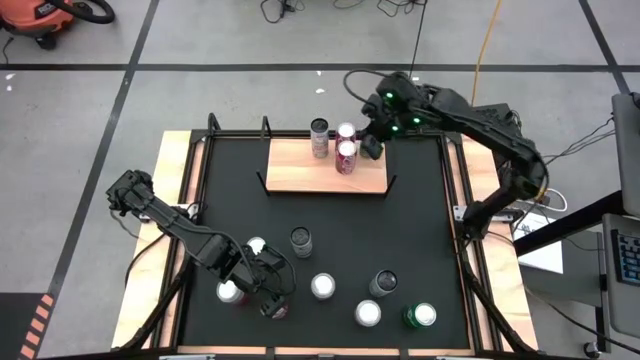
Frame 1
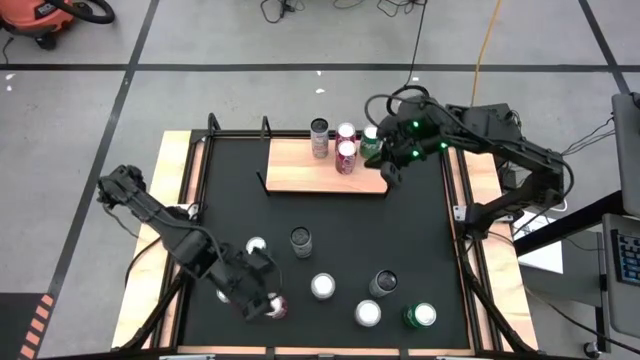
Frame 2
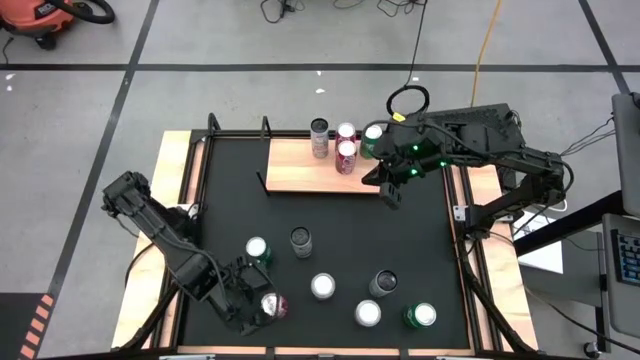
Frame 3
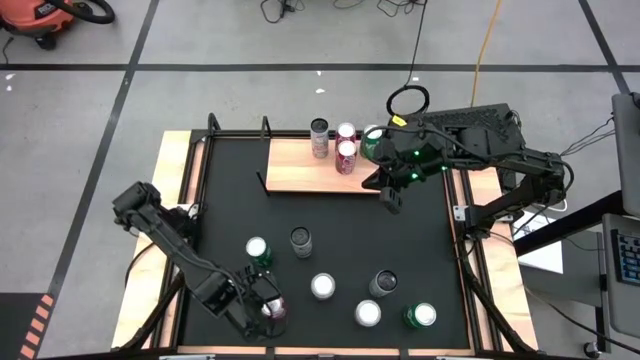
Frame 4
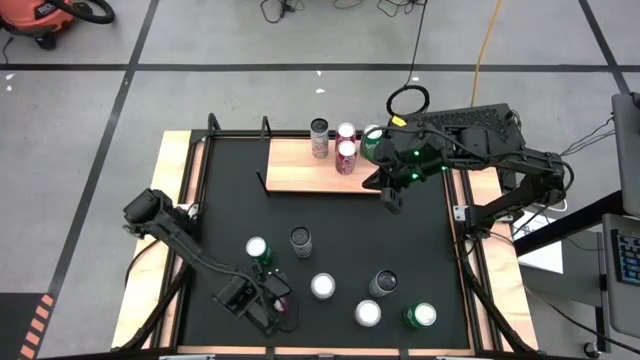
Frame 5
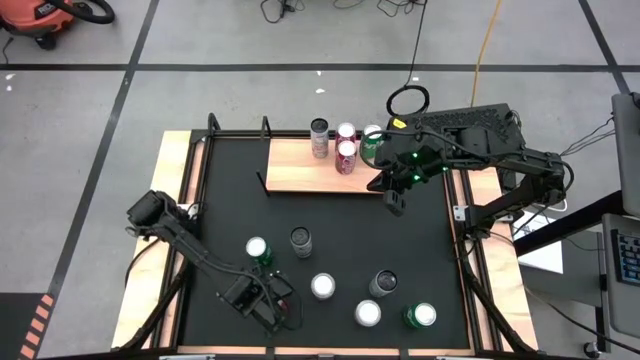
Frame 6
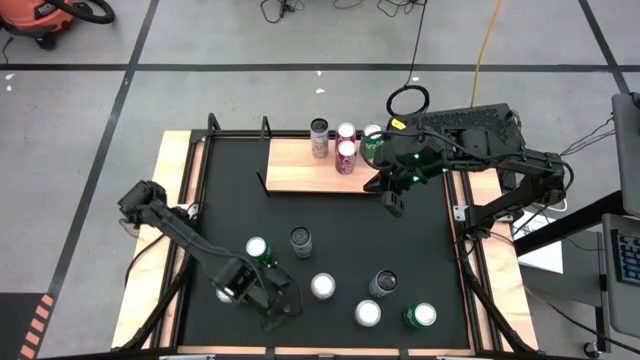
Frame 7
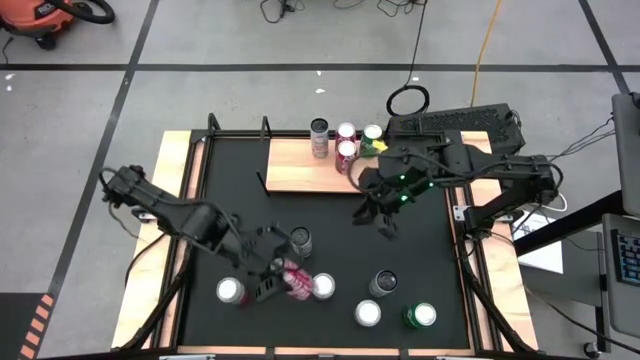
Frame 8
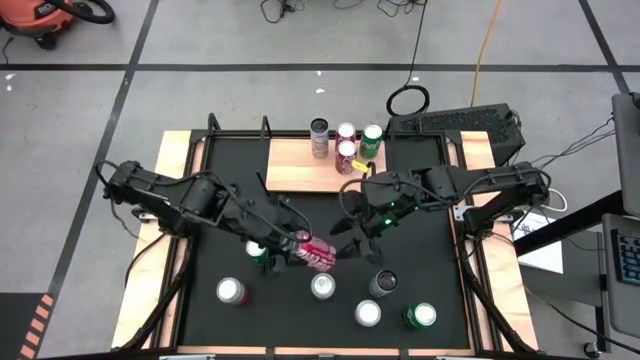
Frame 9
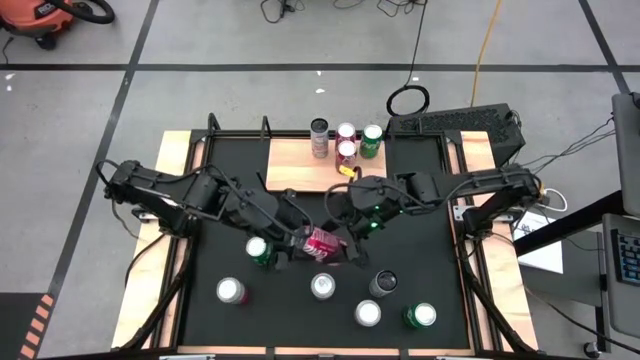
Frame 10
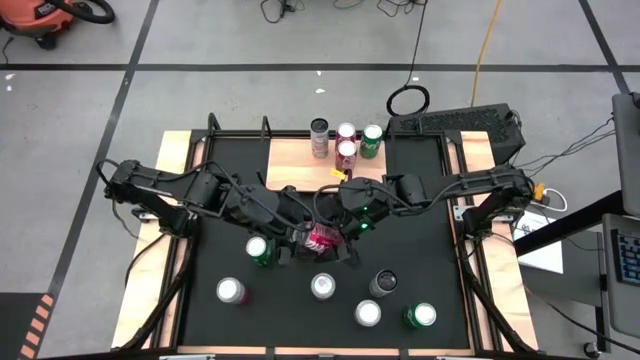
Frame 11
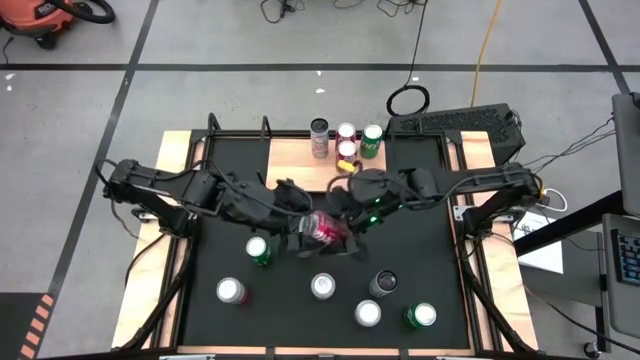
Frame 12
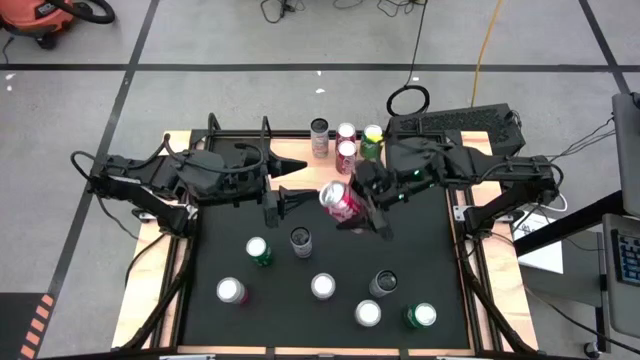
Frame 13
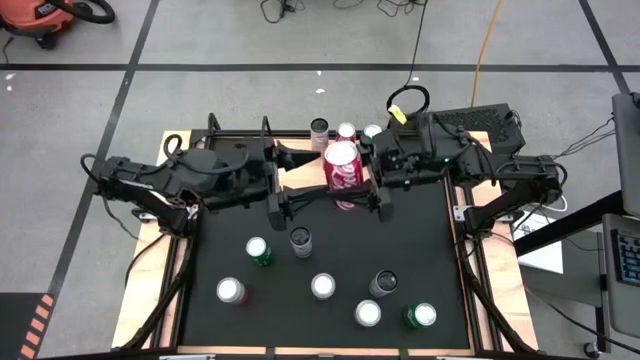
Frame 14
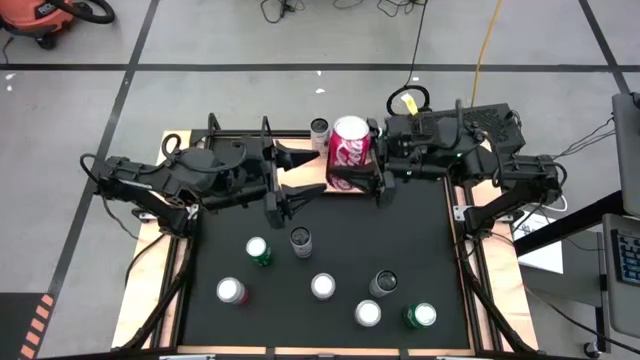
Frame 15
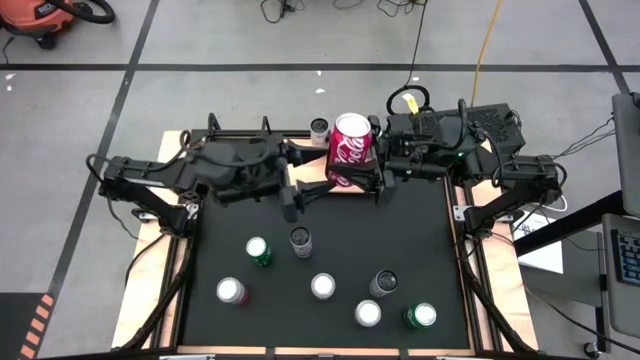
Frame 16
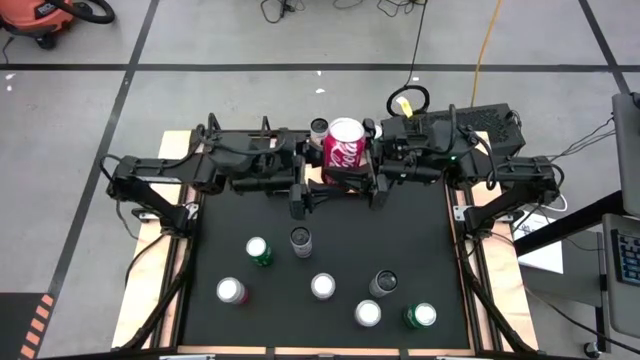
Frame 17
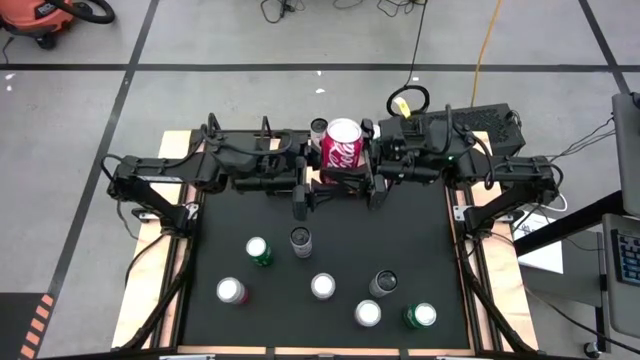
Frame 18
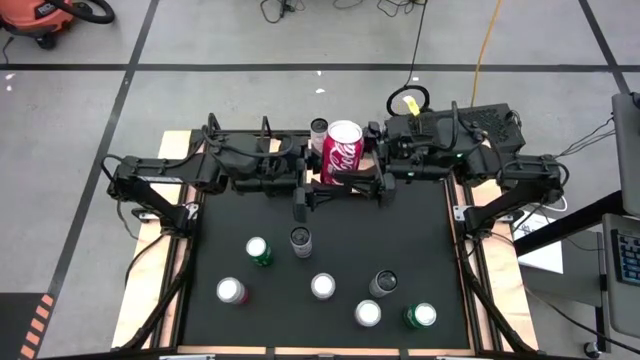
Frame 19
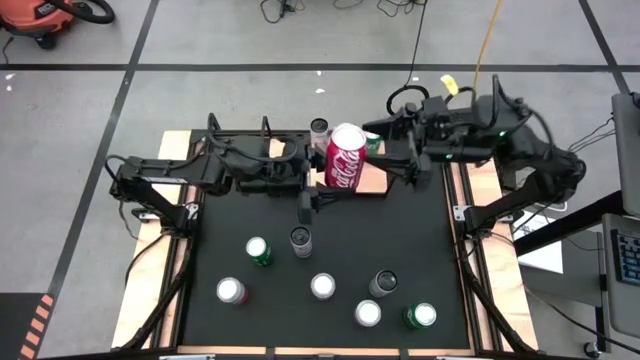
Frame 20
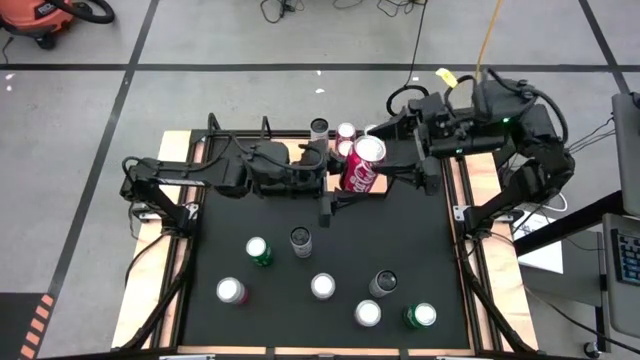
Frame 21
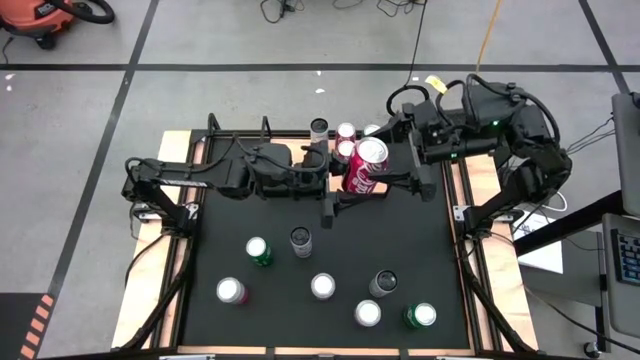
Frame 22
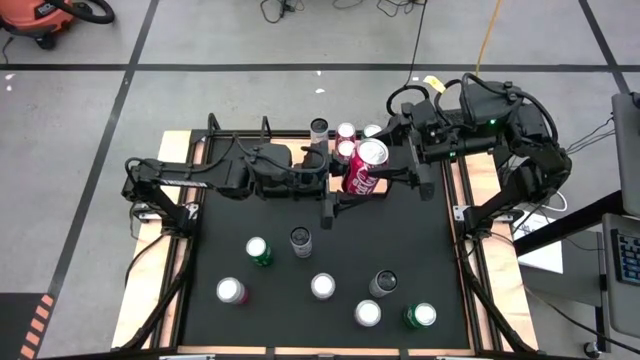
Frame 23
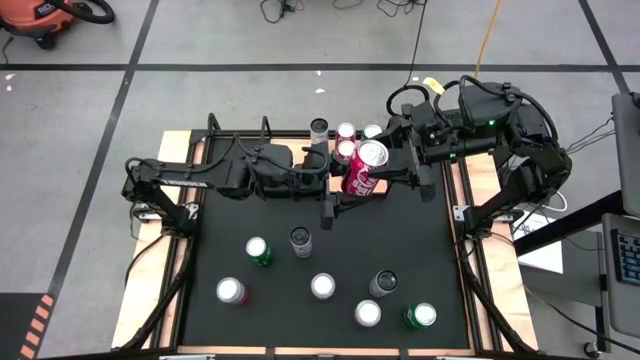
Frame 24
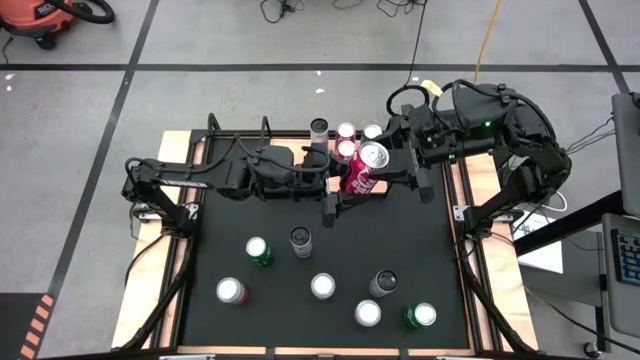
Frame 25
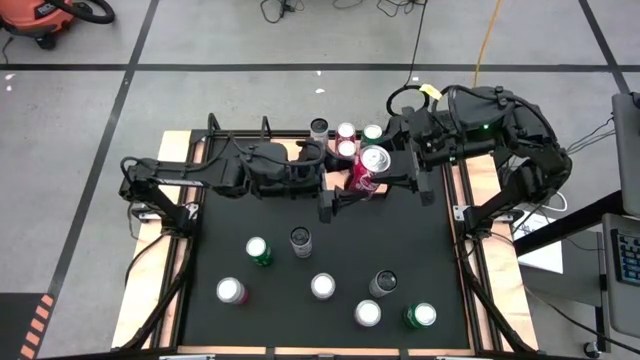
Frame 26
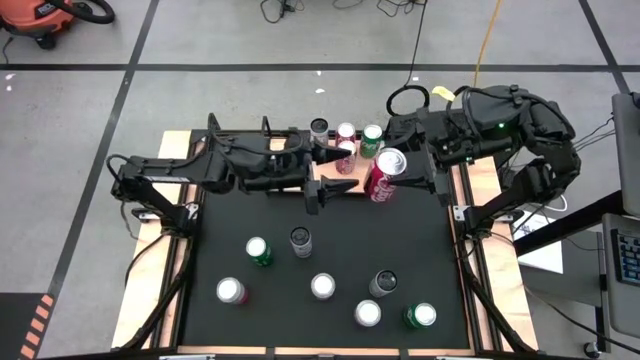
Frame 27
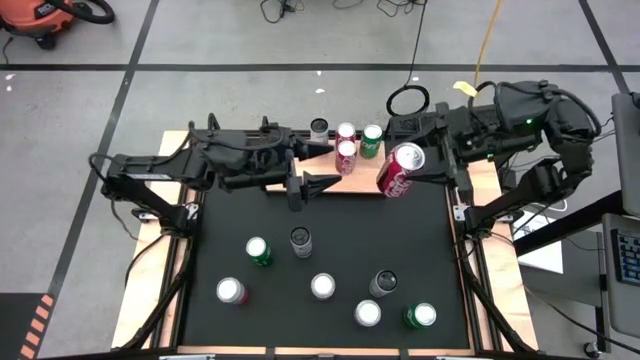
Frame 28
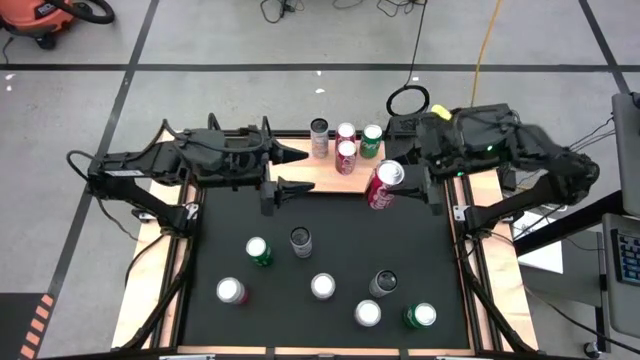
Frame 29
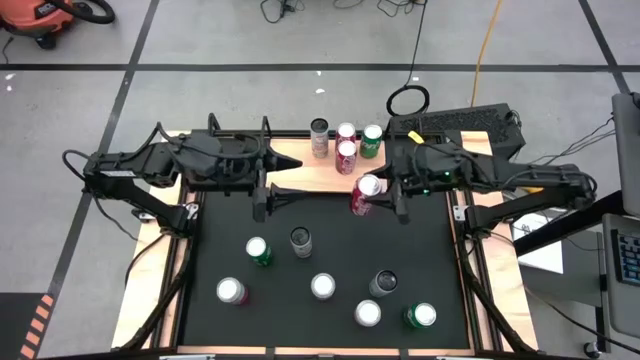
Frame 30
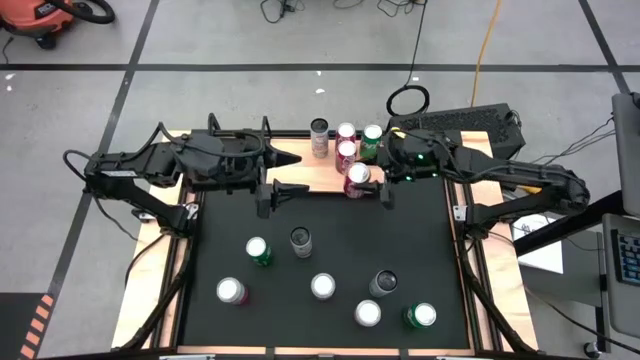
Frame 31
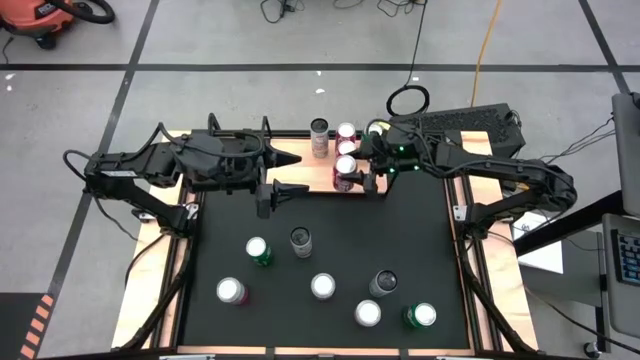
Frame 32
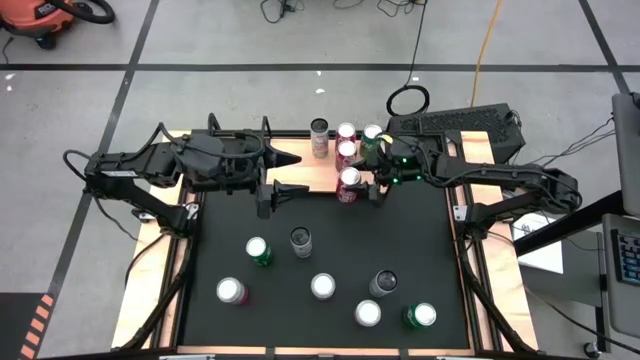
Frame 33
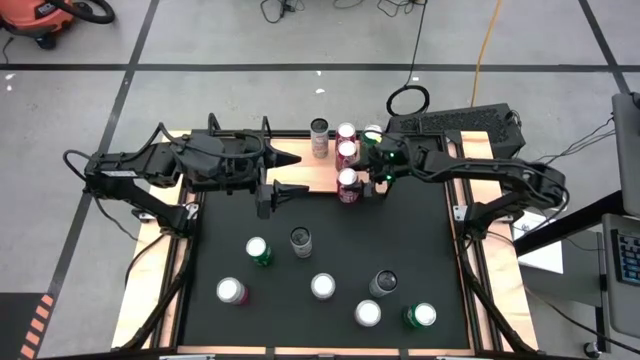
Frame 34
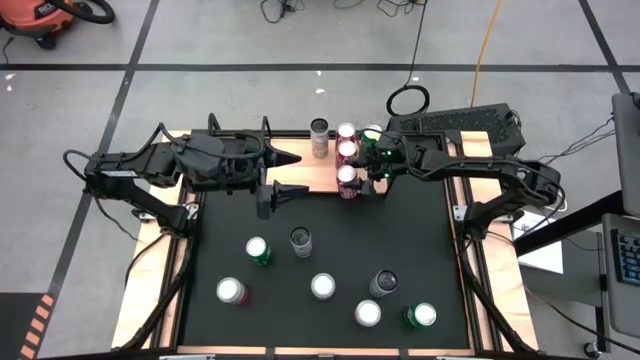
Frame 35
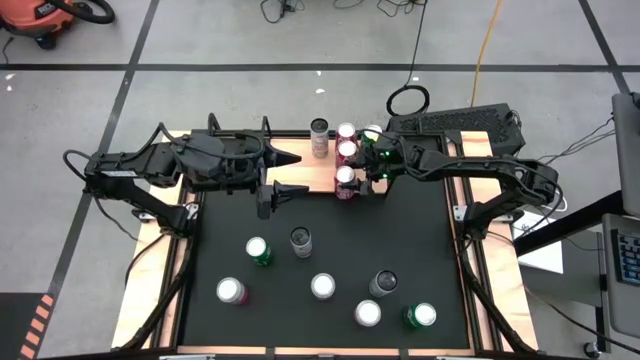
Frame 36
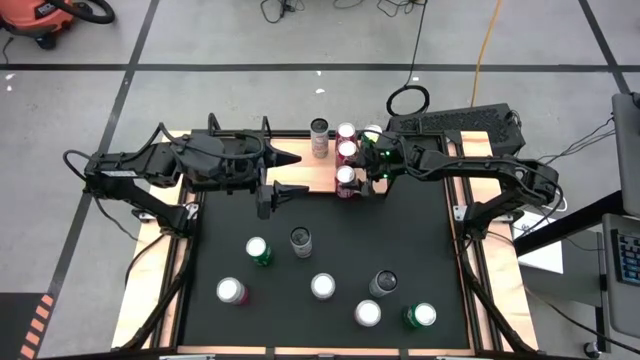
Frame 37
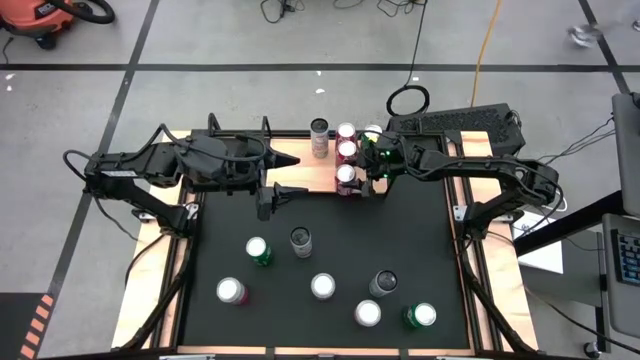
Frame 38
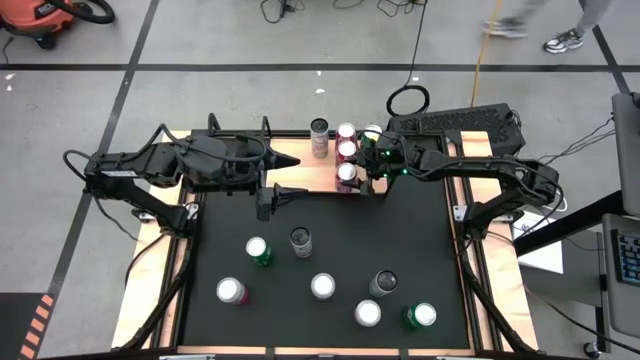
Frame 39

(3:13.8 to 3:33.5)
Task: Place canned beverage on shelf
Put the red soda can on the shelf

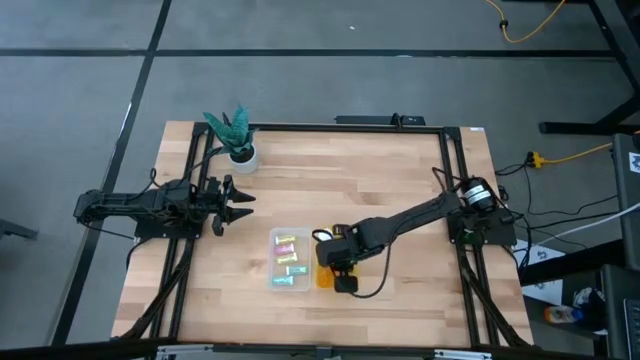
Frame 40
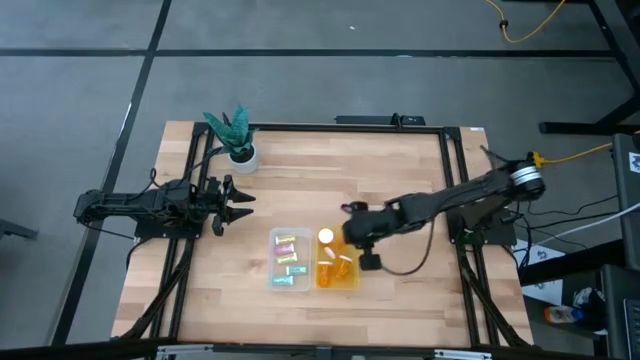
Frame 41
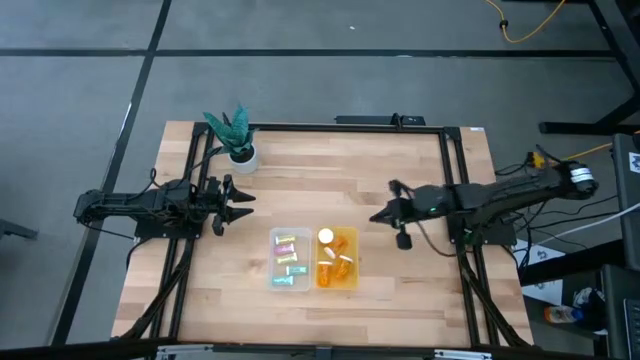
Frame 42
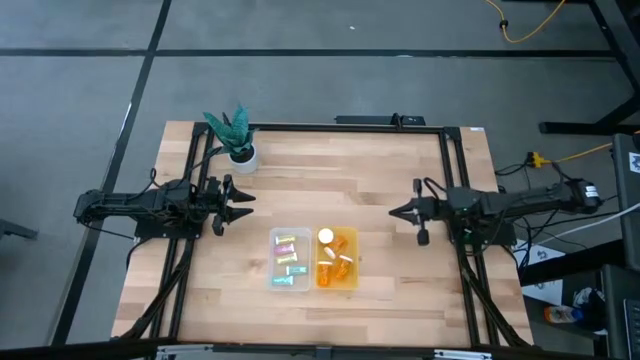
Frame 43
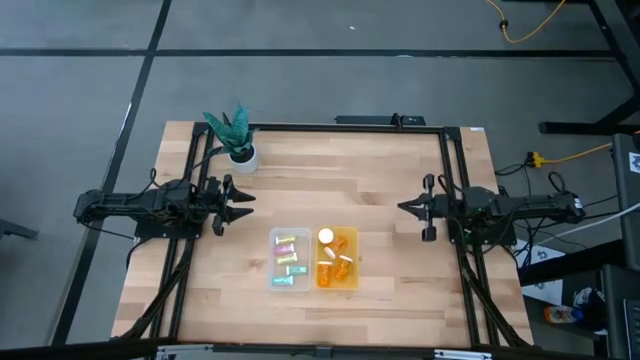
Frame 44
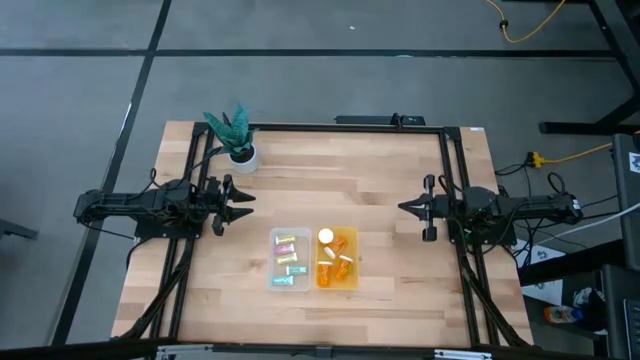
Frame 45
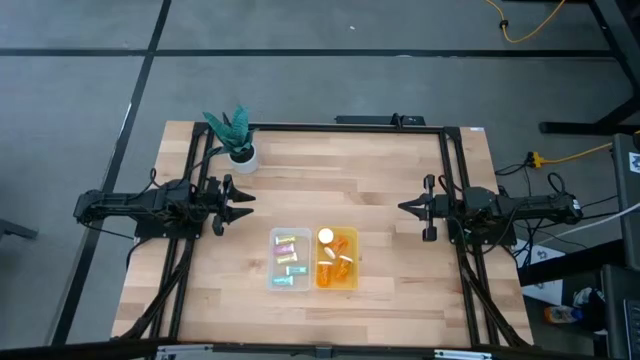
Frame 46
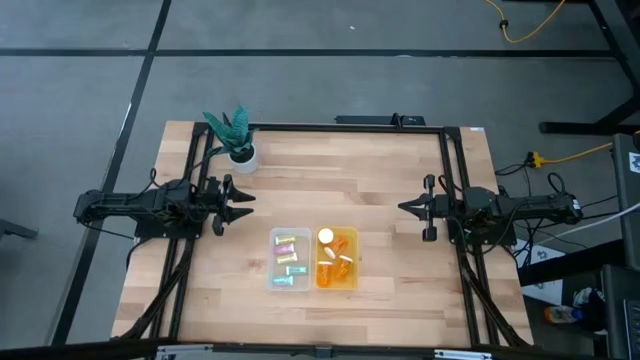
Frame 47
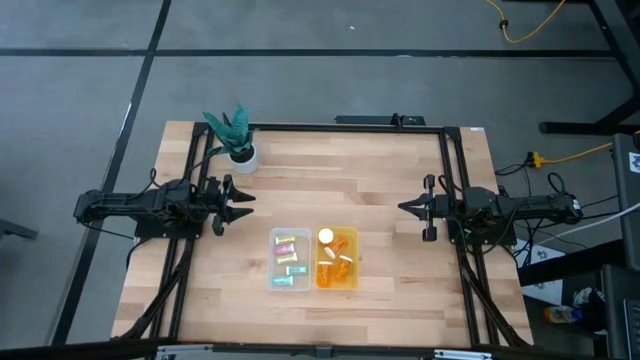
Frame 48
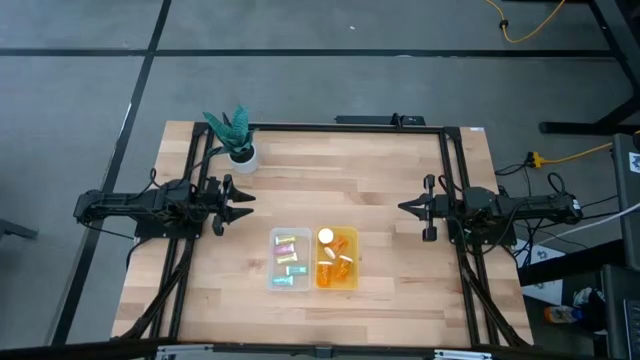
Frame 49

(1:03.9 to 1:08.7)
Task: Pick and place medicine bottles into bin by pill shape (circle, oval)
Return to Home Position
